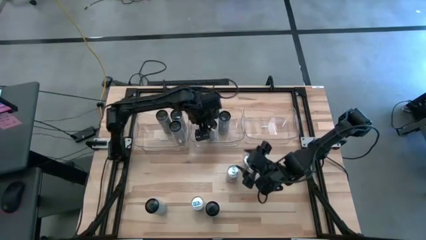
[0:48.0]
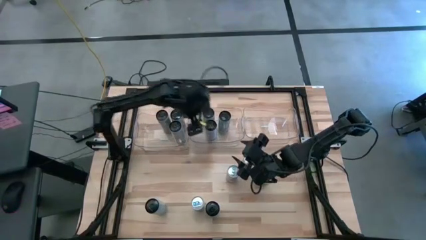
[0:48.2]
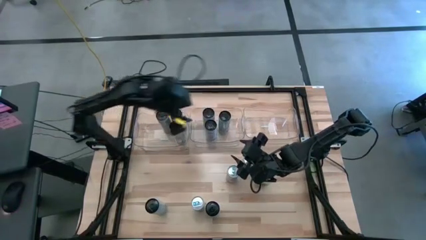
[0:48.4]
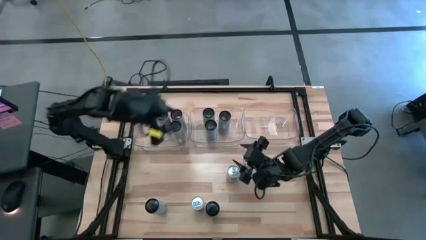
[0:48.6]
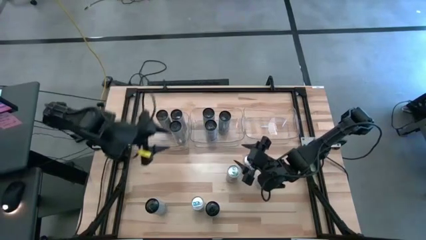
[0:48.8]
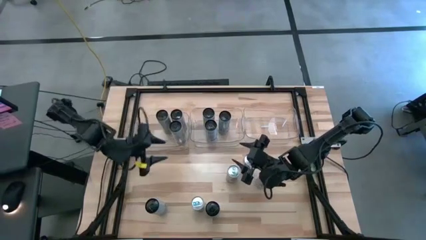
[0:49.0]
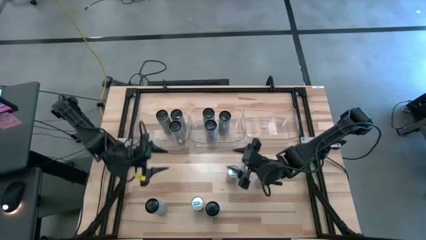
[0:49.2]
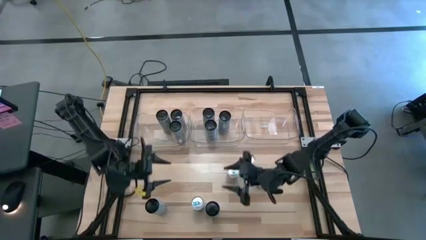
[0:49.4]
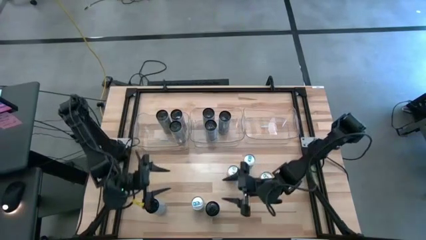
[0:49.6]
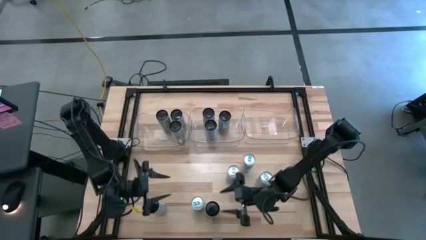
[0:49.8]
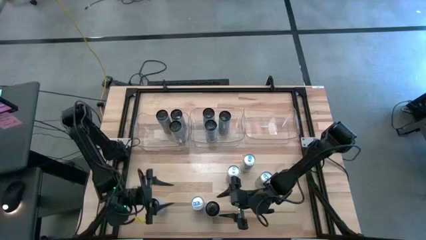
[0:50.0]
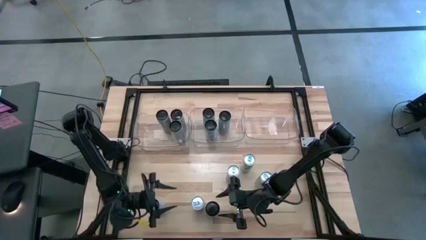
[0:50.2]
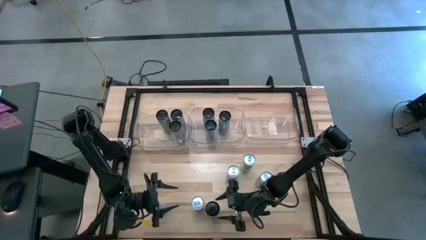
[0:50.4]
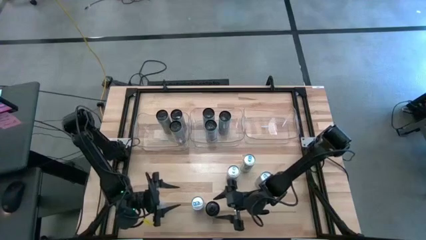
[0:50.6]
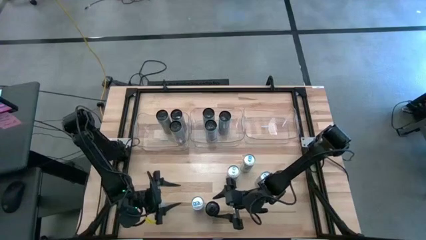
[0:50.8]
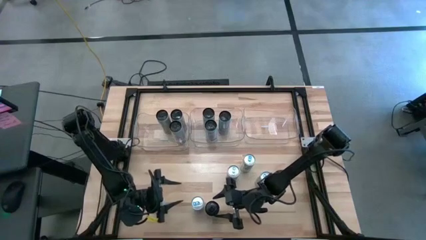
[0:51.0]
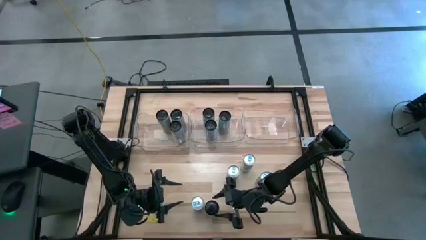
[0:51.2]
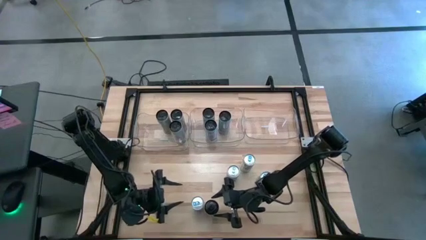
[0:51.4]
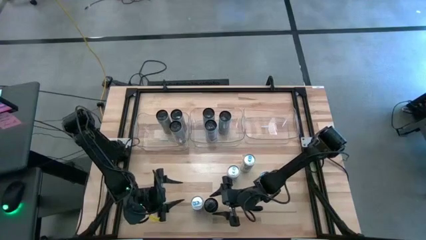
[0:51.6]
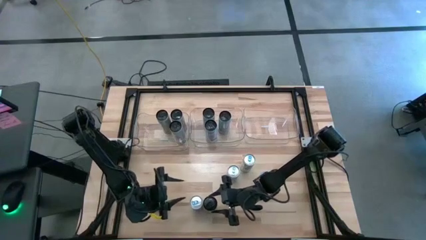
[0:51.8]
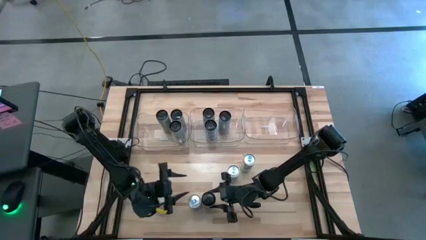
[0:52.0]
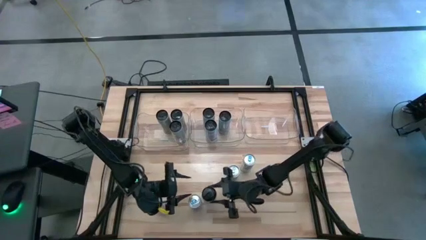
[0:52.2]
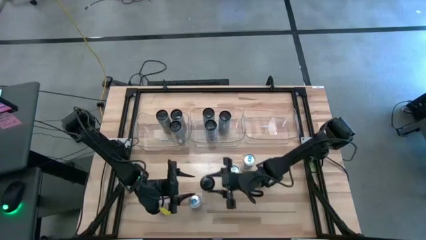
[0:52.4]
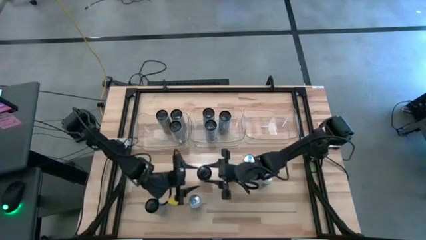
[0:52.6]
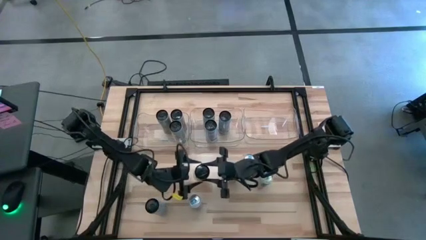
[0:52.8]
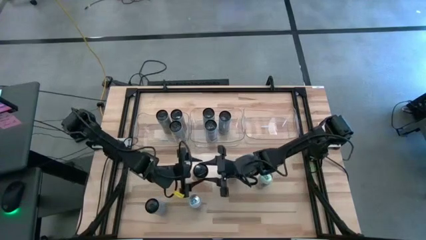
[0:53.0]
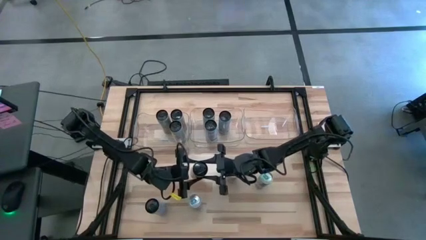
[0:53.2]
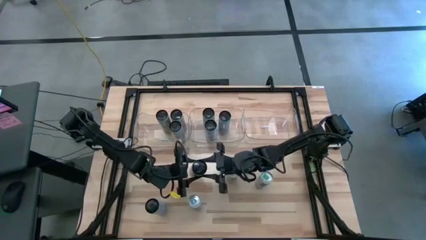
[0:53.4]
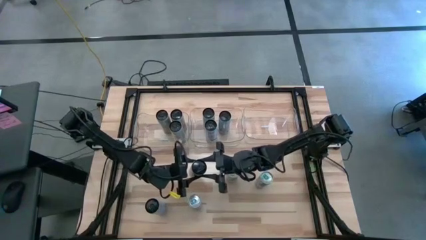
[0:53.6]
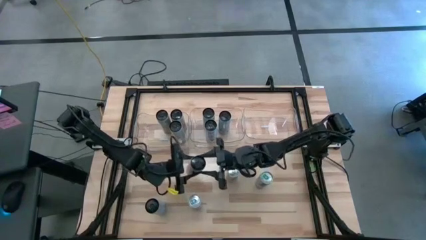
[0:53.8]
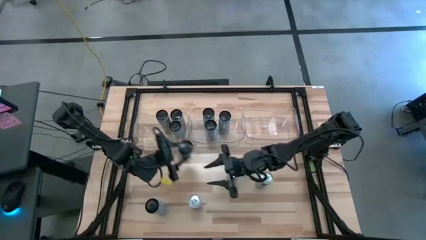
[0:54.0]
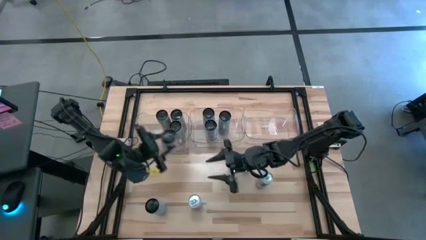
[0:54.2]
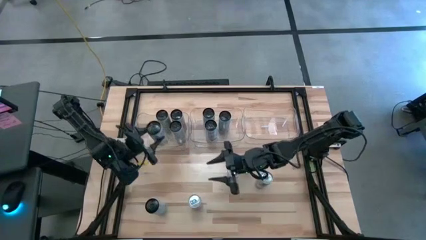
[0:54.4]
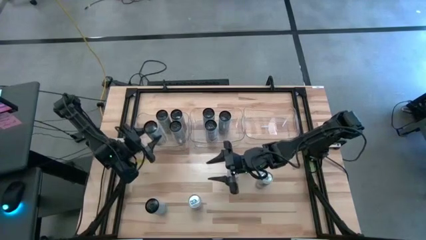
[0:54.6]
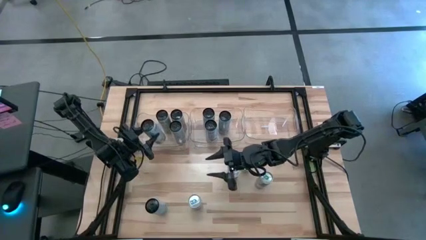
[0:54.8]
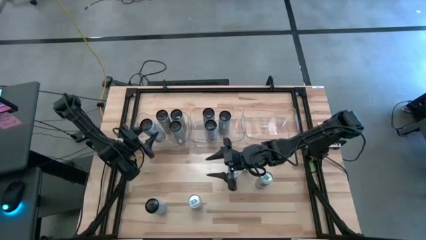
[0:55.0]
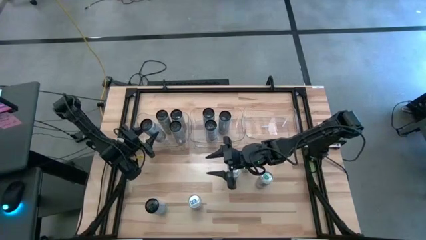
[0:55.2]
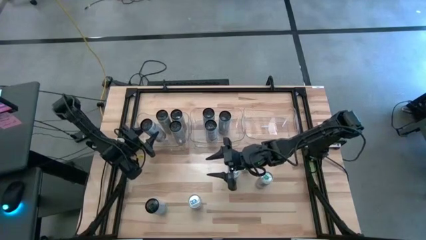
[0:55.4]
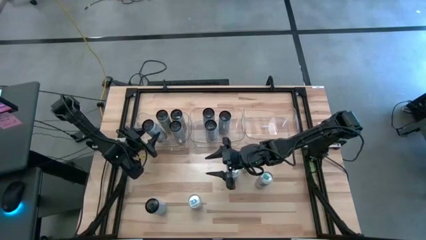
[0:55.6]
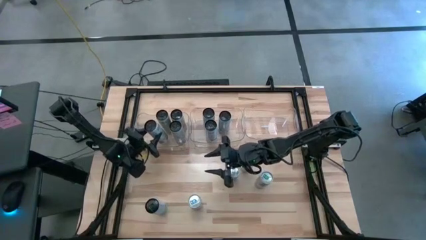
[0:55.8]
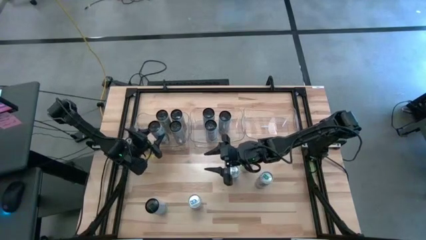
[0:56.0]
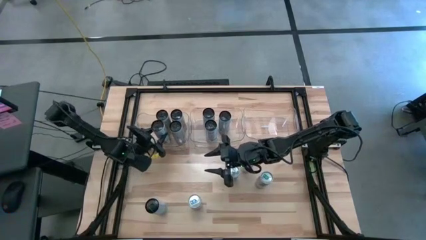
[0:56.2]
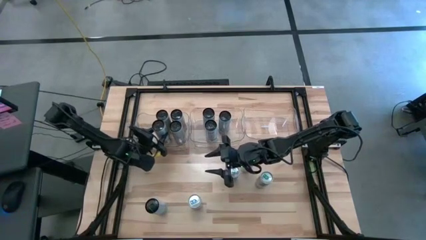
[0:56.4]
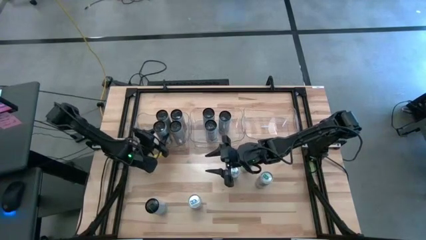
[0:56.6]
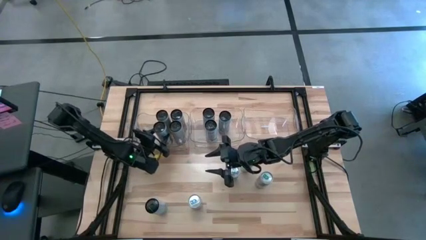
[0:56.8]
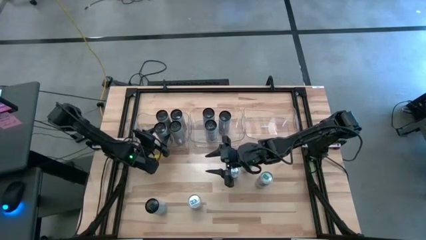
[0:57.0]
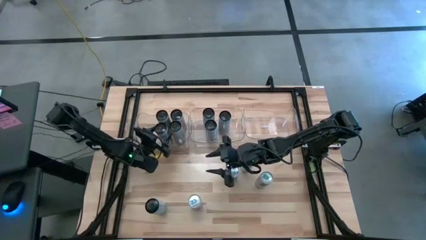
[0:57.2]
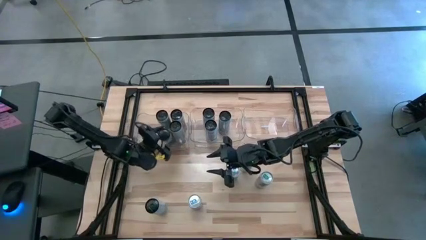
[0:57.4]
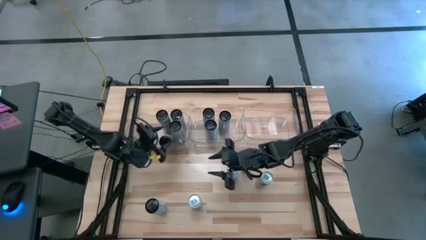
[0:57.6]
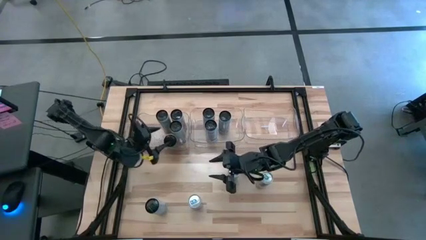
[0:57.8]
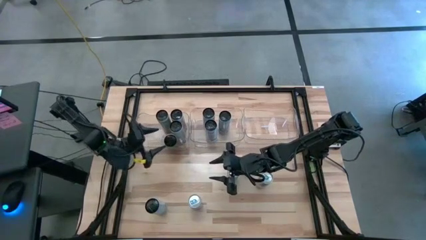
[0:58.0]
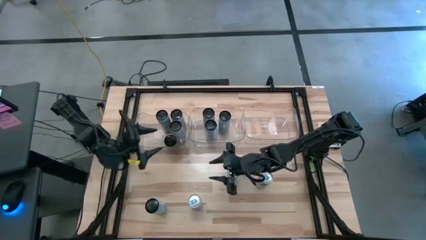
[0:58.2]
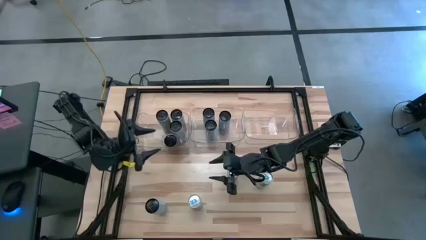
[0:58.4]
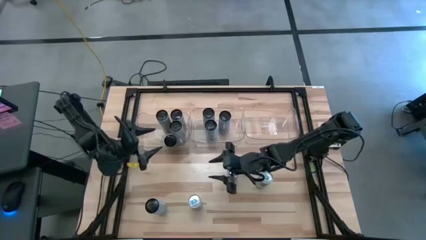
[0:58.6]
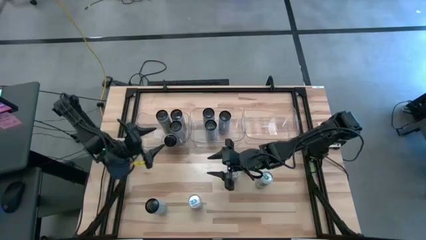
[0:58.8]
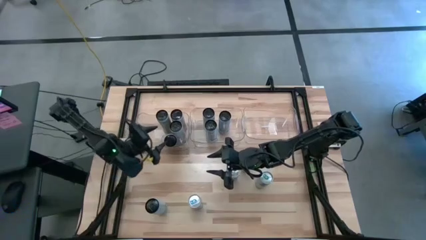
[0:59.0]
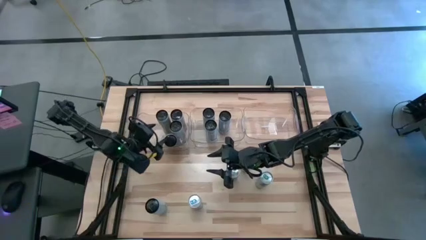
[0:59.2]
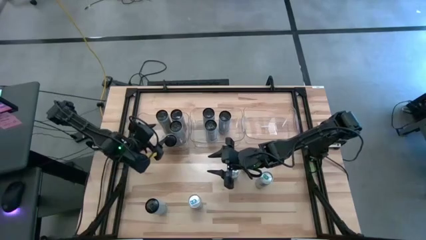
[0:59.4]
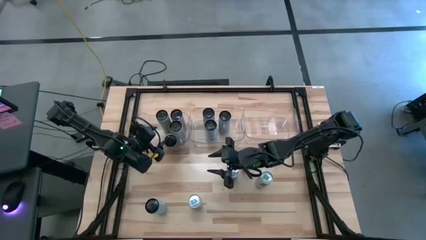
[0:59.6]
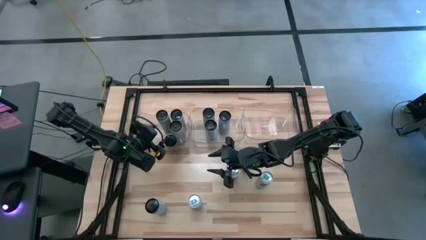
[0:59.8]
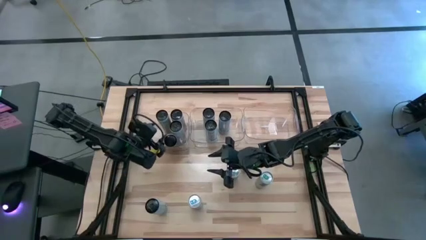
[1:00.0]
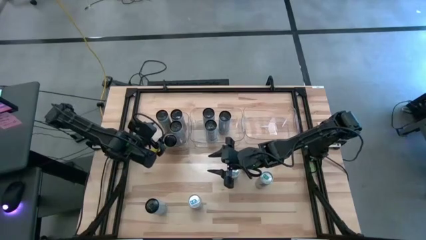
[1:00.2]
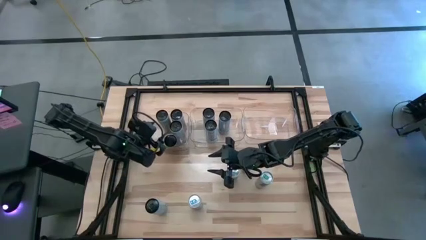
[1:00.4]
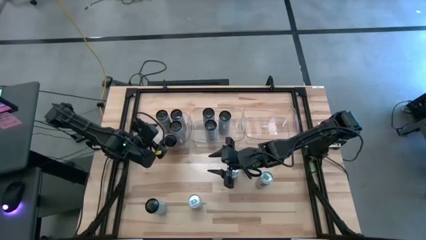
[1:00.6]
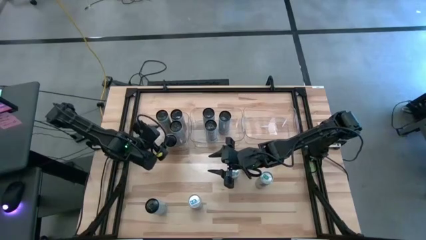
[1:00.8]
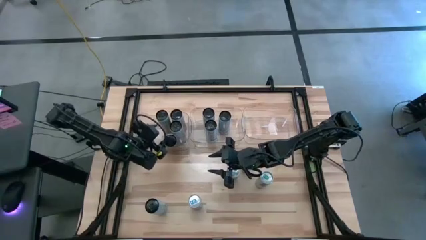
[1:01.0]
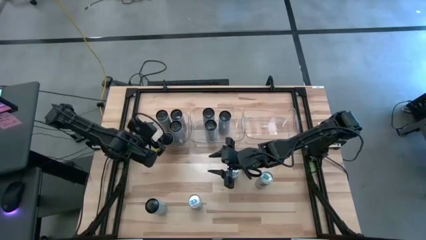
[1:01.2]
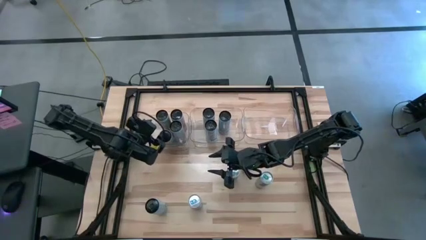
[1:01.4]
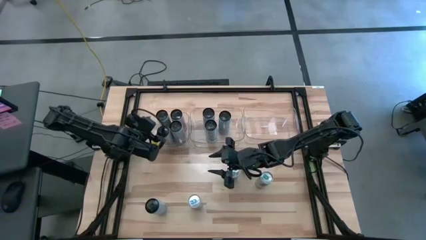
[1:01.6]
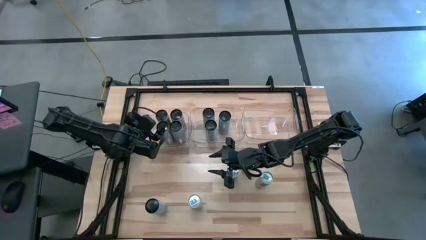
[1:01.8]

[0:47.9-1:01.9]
Task: Sort soda cans
Put the green soda can into the left transparent bin

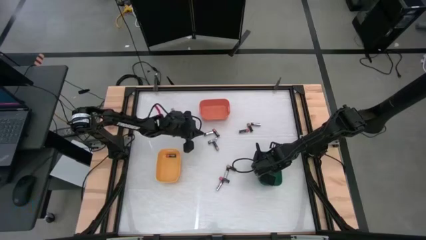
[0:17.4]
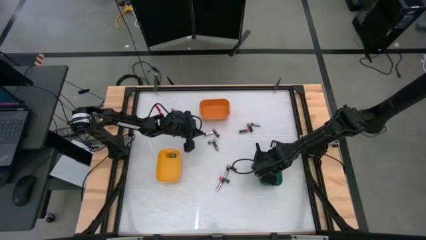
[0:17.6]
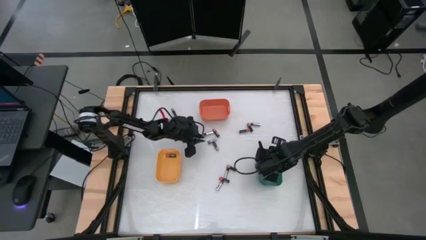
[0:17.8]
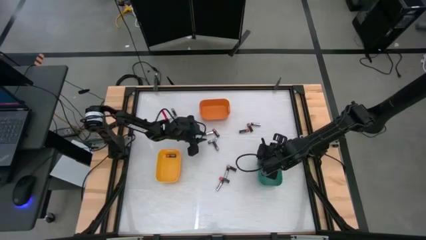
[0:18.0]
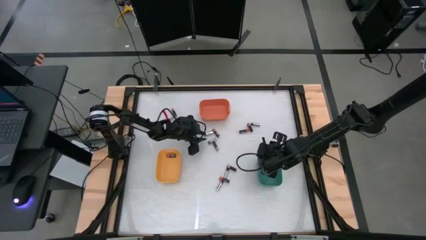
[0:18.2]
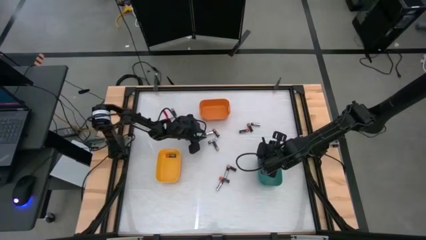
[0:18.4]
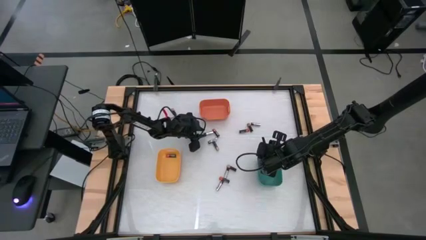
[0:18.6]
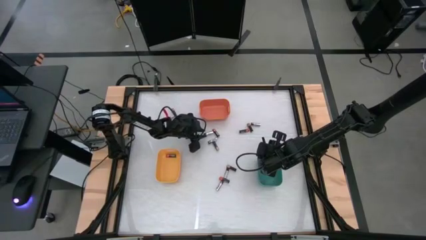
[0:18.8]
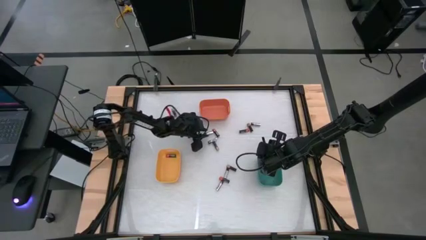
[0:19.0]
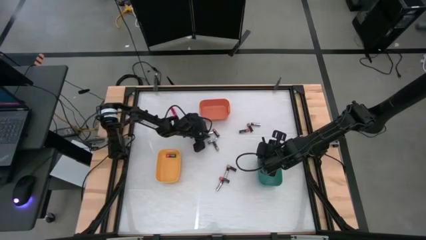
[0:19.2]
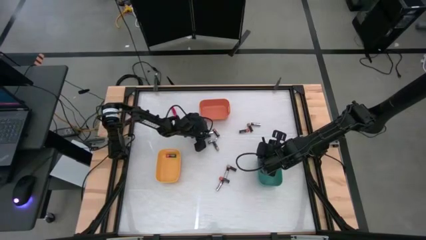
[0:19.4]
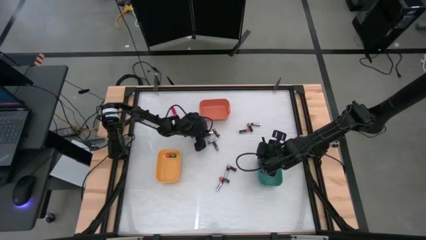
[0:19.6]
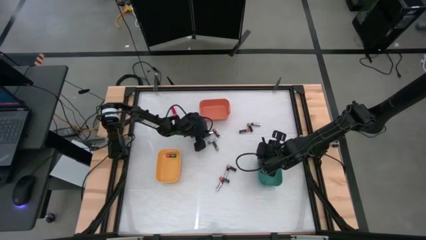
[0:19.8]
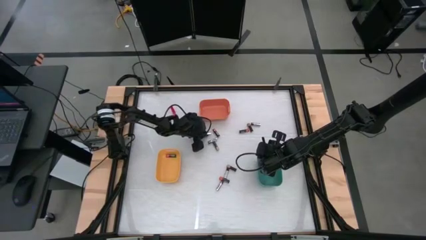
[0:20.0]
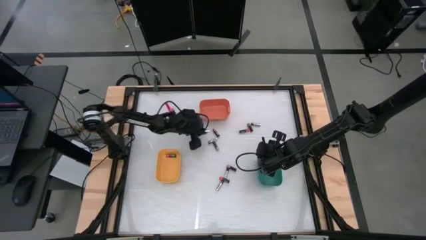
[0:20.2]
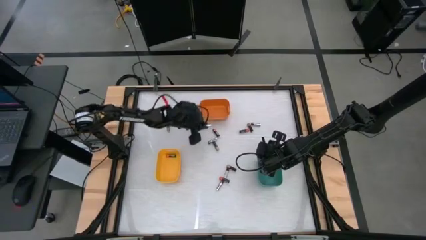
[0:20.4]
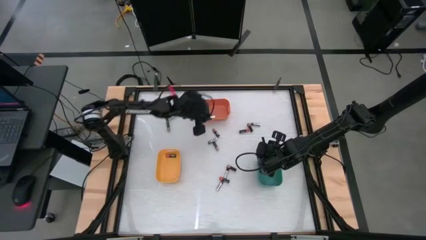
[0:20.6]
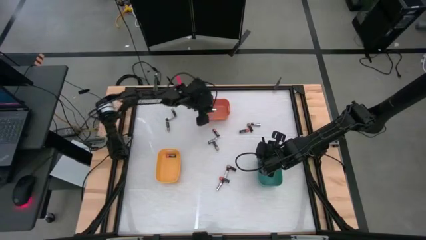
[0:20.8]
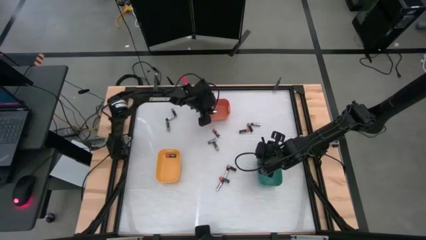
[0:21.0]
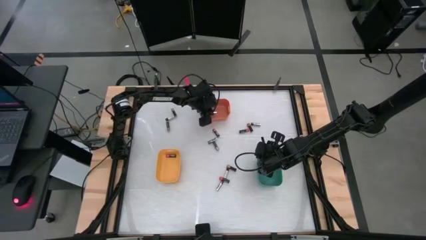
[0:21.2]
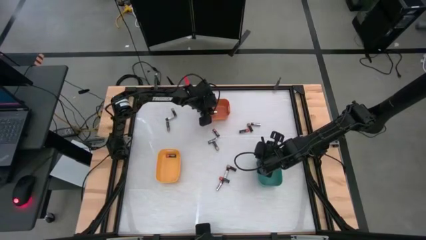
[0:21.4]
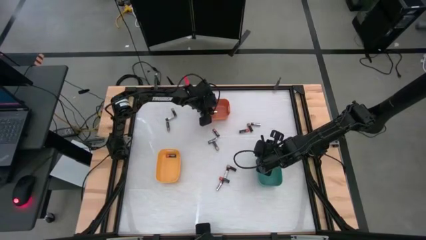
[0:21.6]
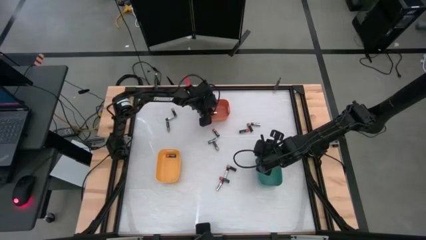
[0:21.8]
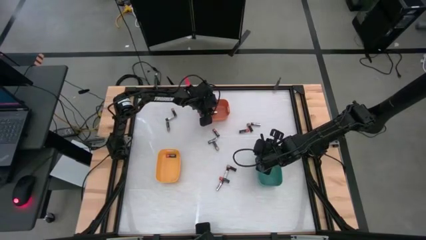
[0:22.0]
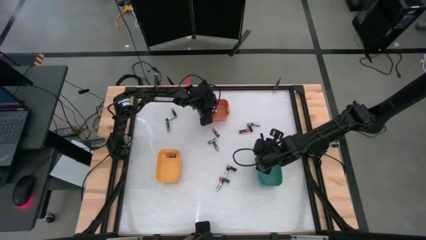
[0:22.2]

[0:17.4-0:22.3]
Task: Sort batteries
Put the silver battery into the orange bin
